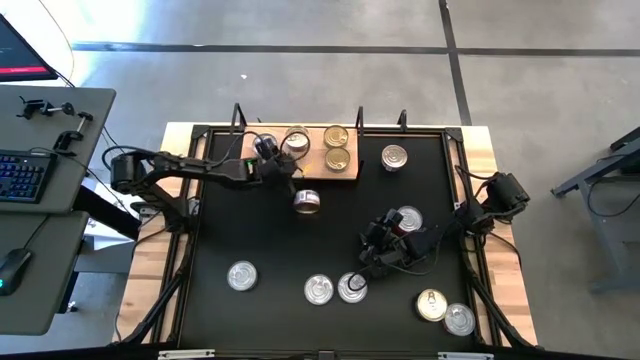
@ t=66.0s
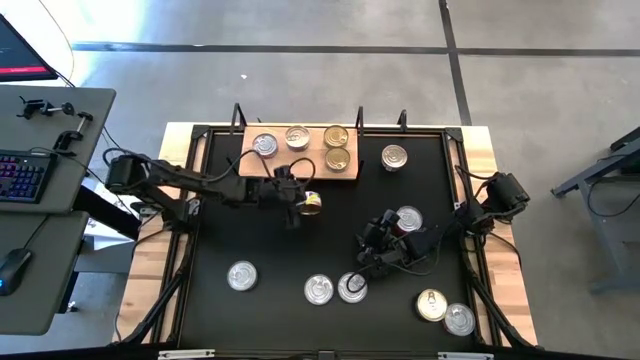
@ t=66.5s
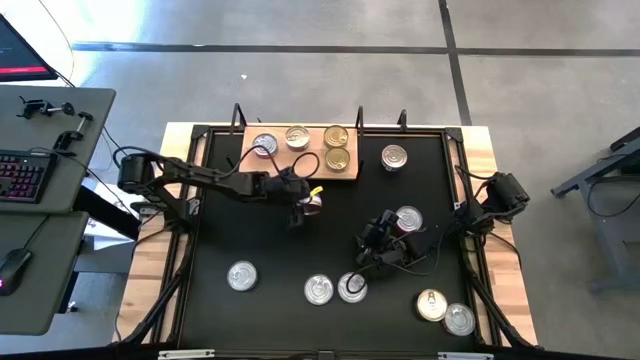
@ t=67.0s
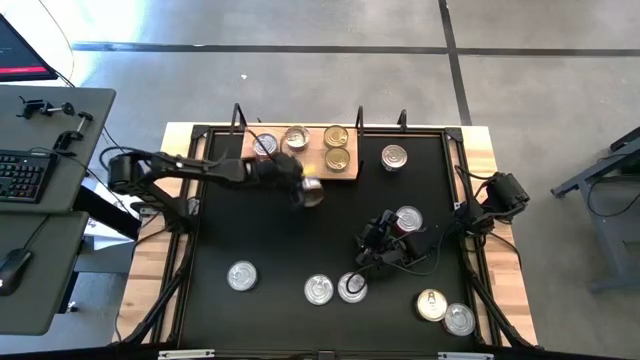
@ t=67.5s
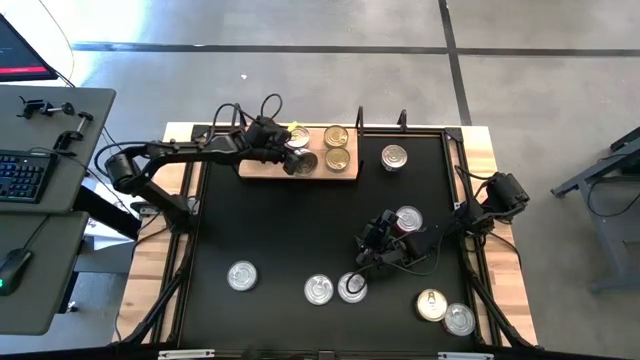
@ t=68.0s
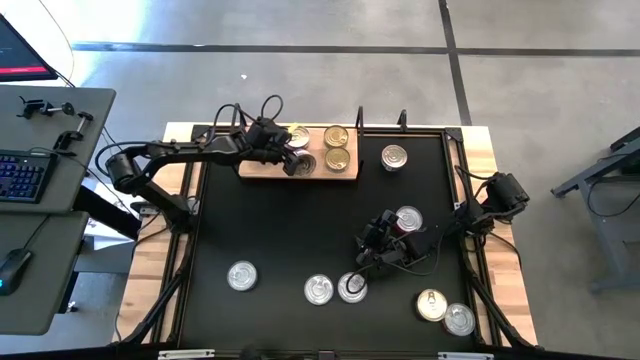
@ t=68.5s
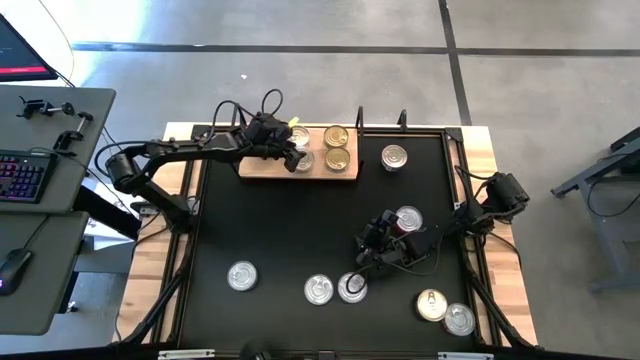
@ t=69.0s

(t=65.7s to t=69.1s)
Task: Stack canned seafood by type on shelf
Put the blue and pink tuna can on the shelf aligned with the other blue and pink tuna can

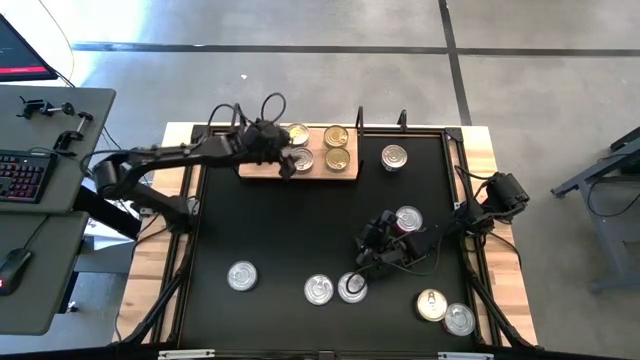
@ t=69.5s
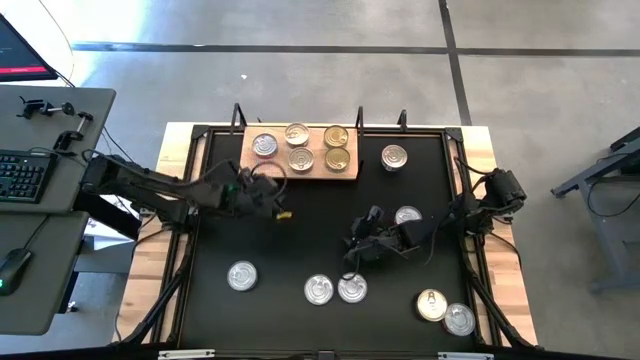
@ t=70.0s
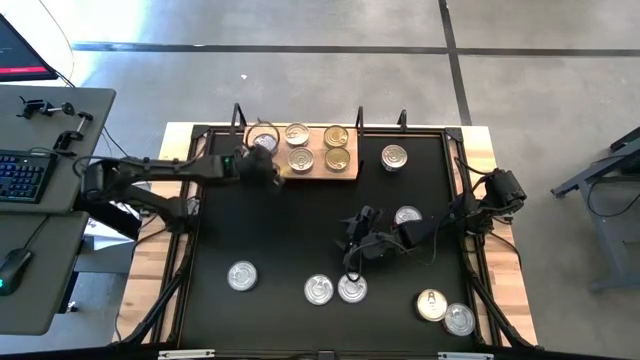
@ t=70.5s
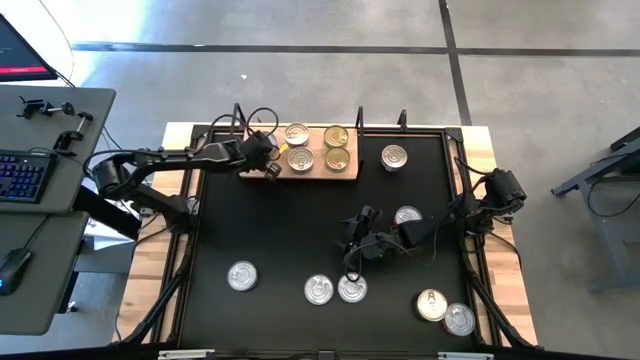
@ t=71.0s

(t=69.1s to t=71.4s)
Adjust the red tuna can on the shelf

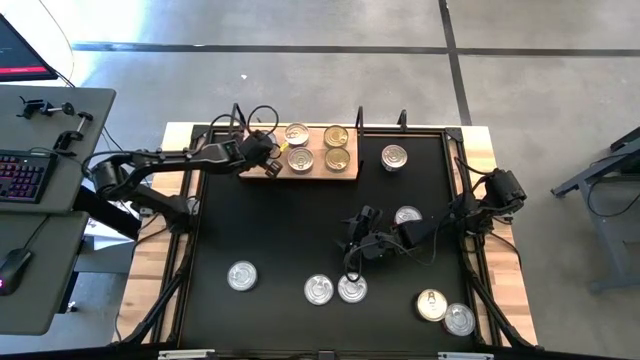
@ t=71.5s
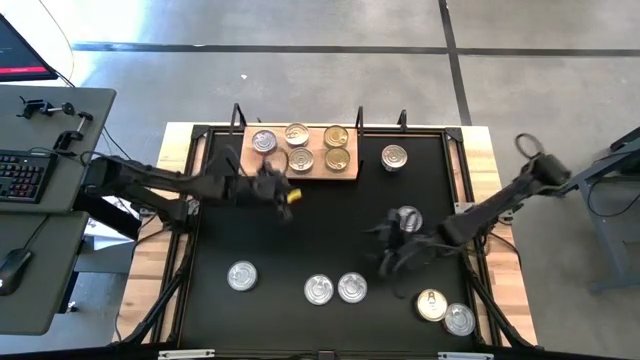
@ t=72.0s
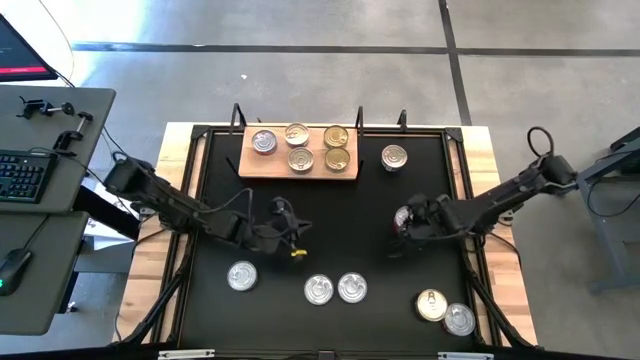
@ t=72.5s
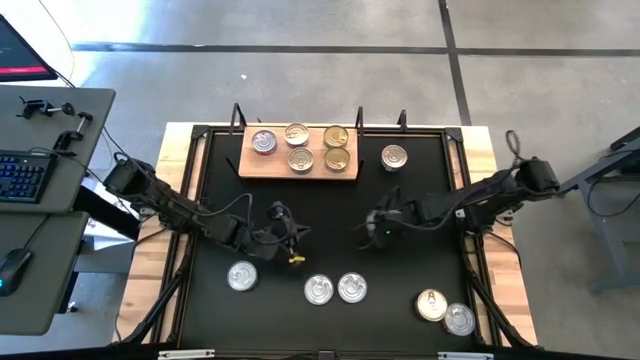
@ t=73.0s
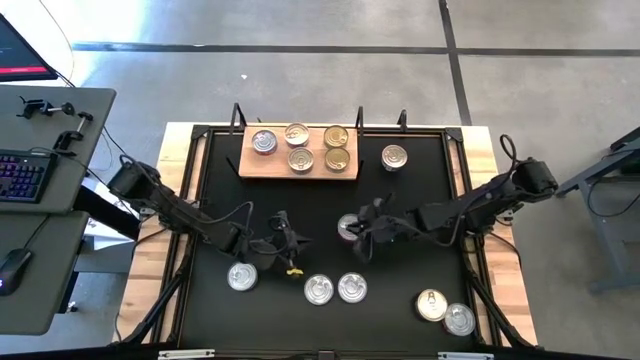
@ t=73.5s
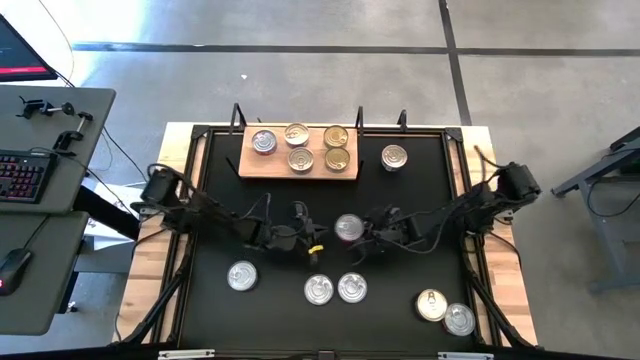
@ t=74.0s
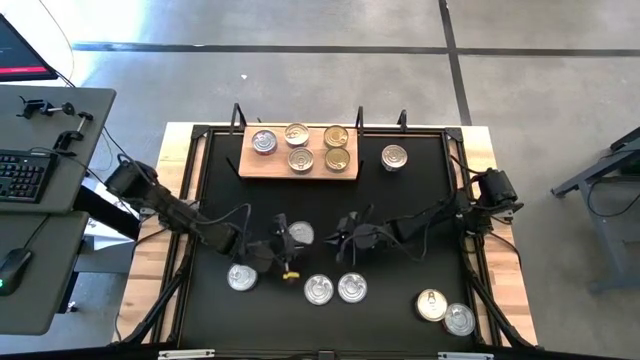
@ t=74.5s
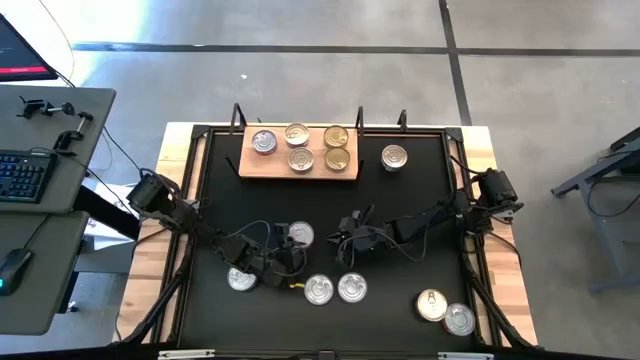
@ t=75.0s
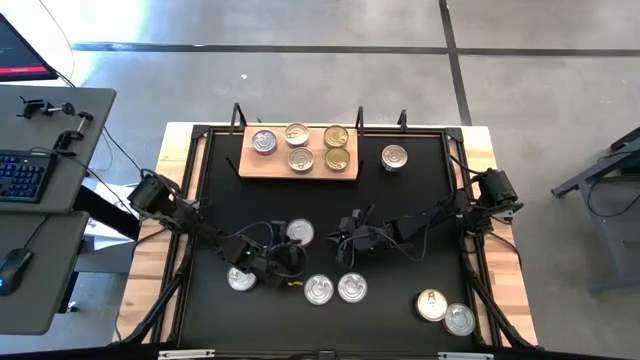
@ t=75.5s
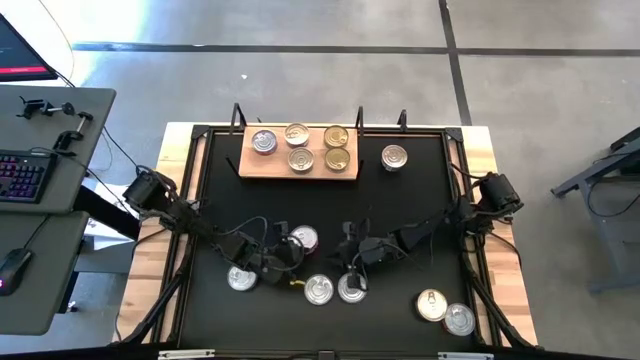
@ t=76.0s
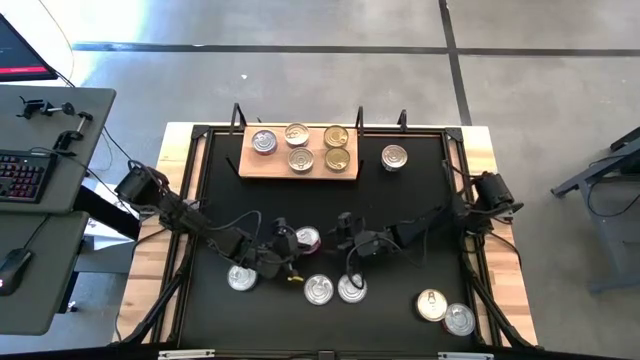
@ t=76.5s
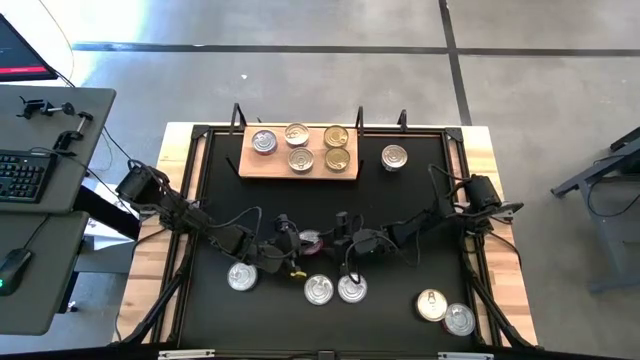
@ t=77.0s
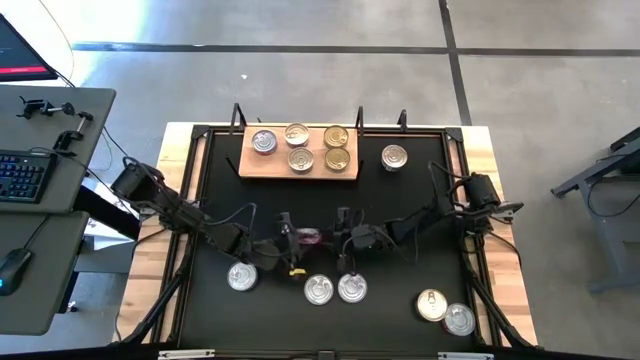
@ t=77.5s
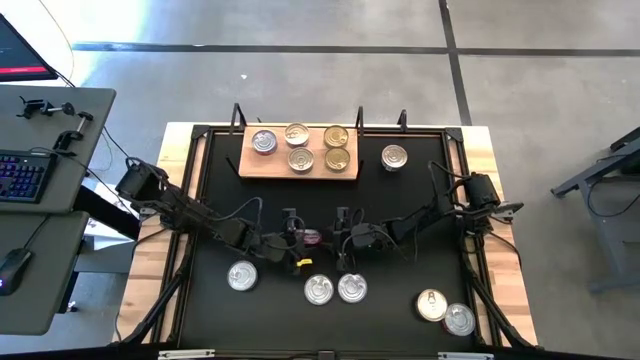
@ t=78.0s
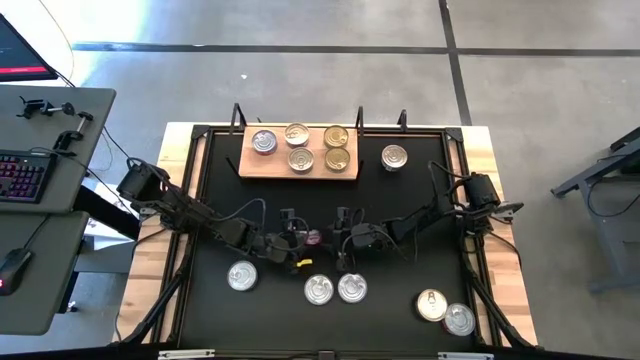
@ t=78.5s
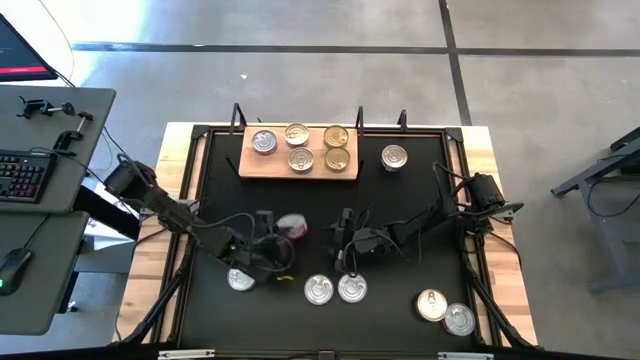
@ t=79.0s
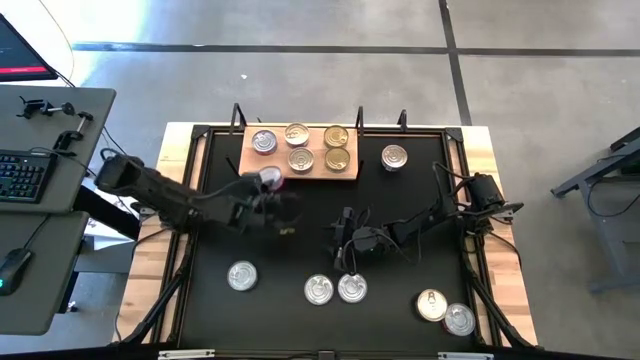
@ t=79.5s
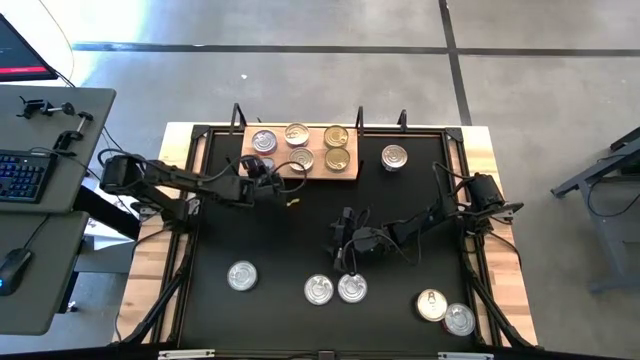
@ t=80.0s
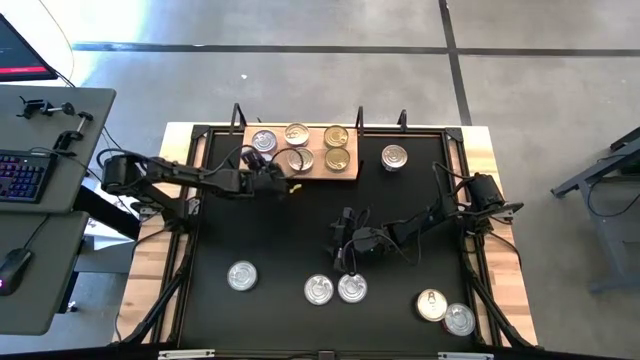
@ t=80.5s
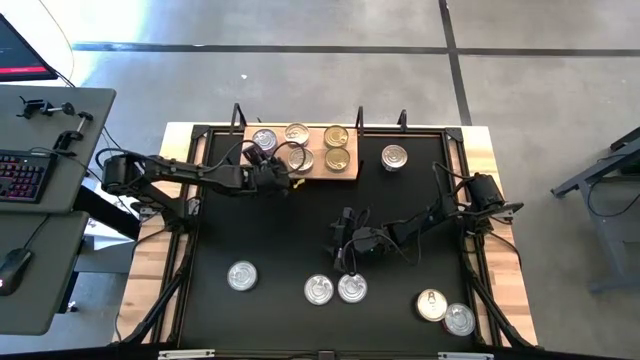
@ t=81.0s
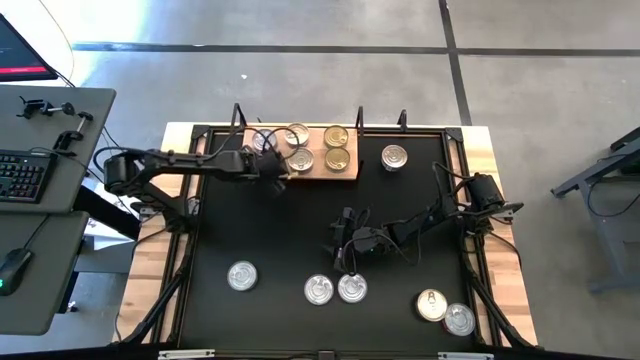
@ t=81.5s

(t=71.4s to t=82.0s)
Put the red tuna can on the shelf aligned with the other red tuna can
